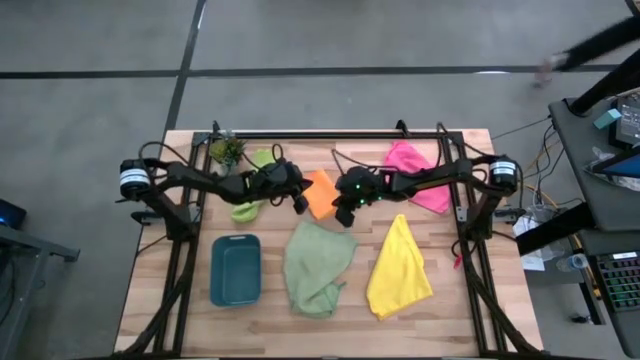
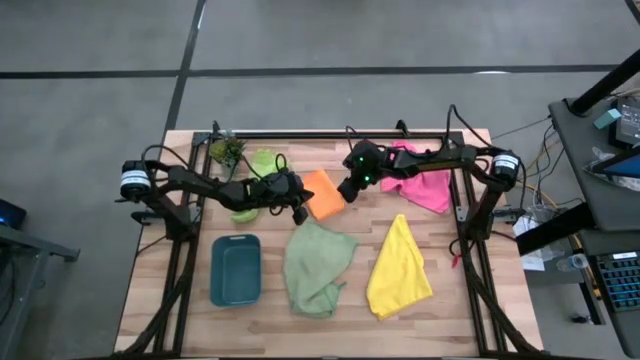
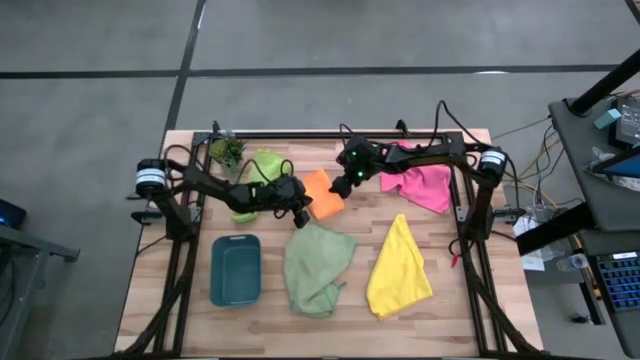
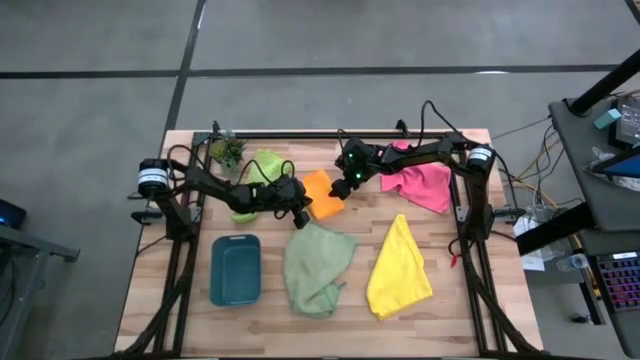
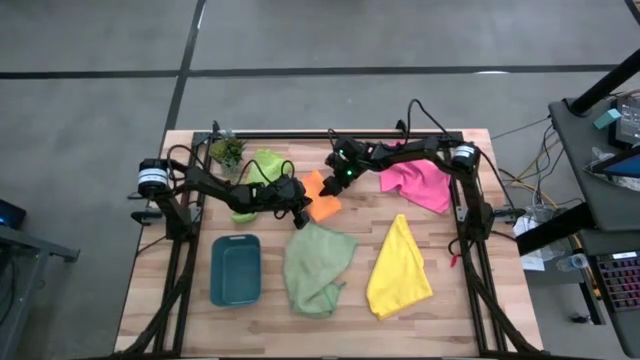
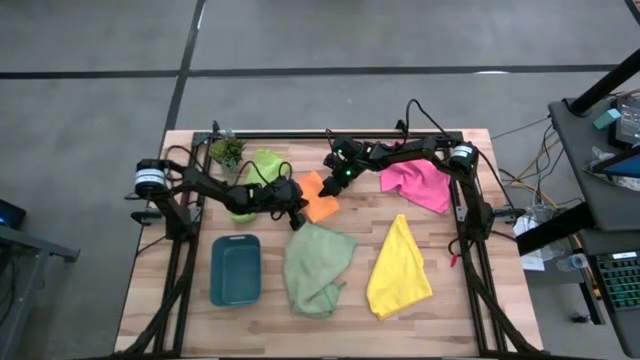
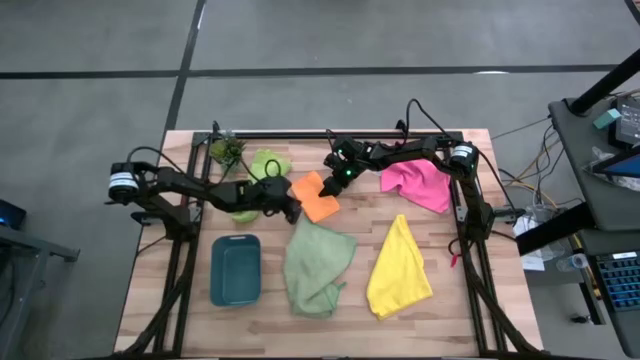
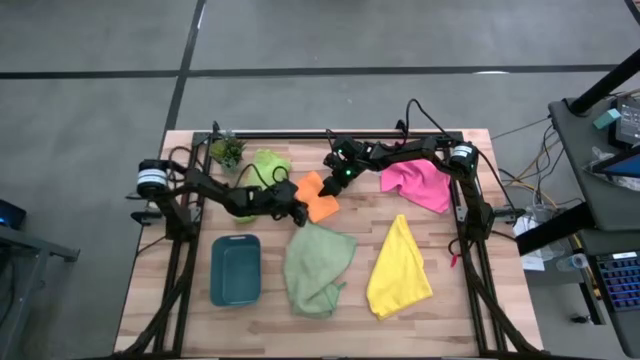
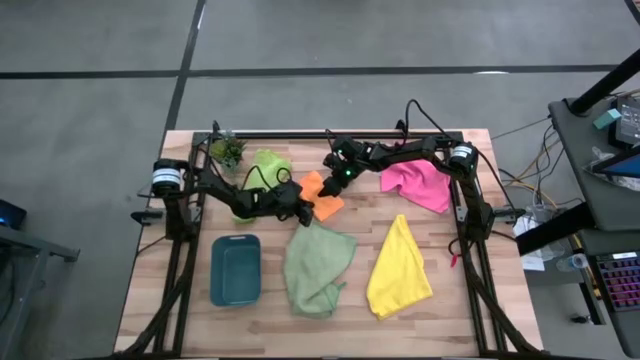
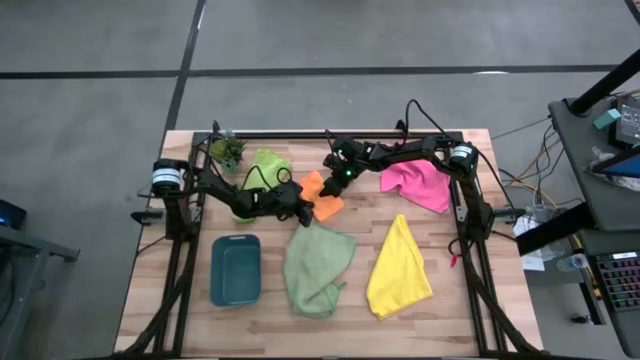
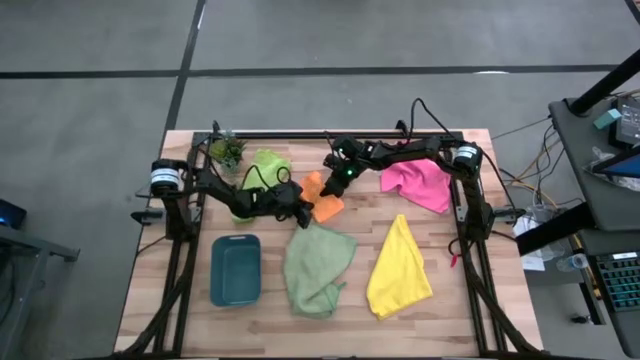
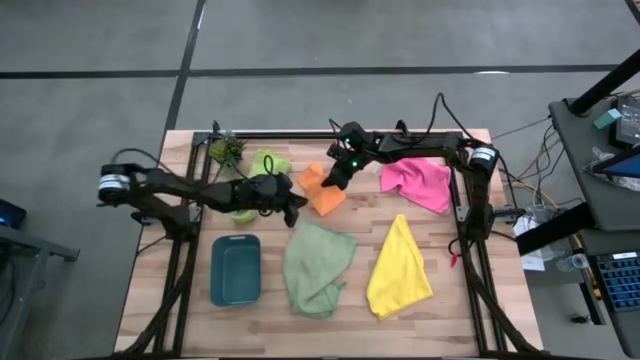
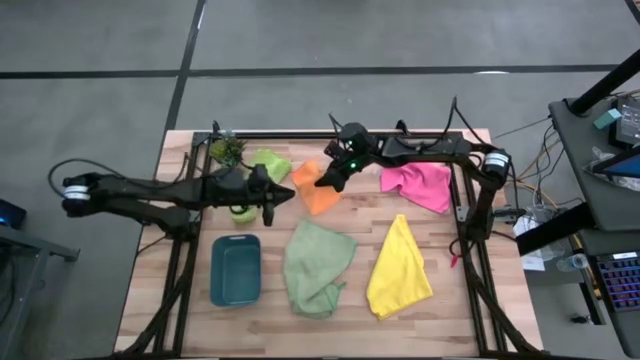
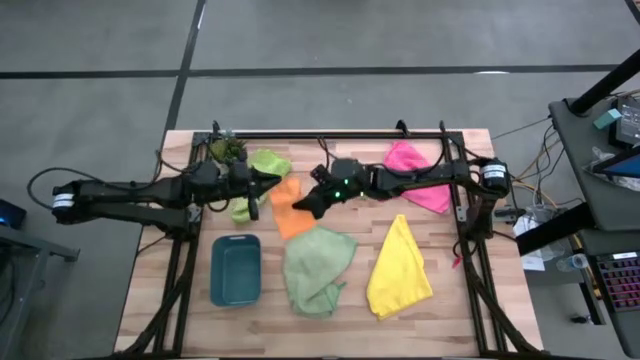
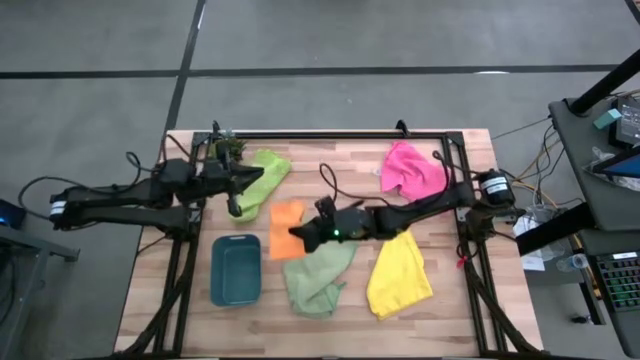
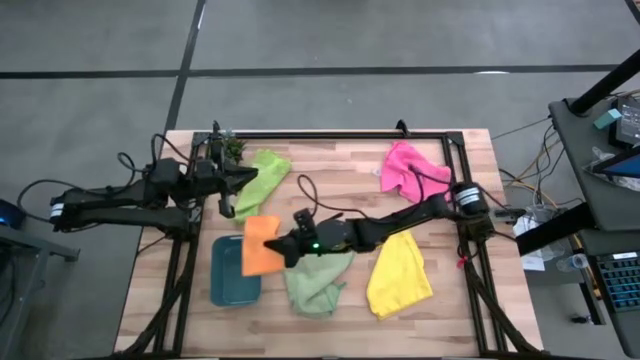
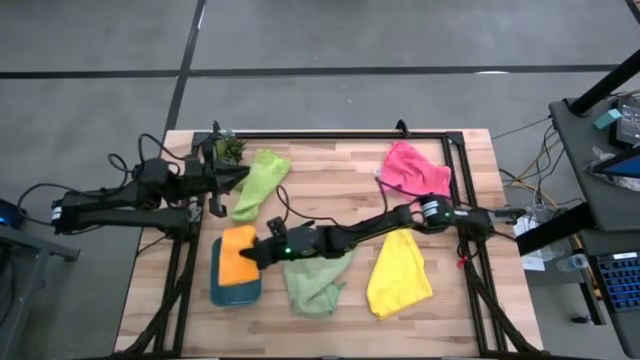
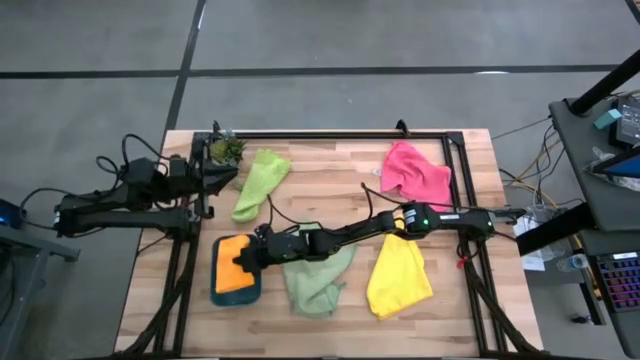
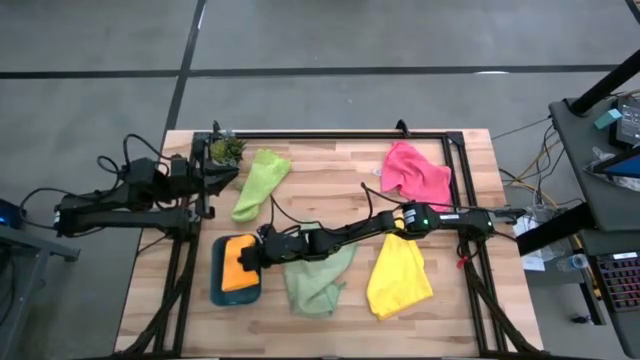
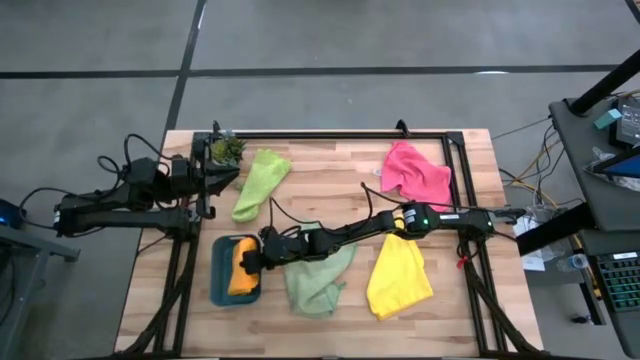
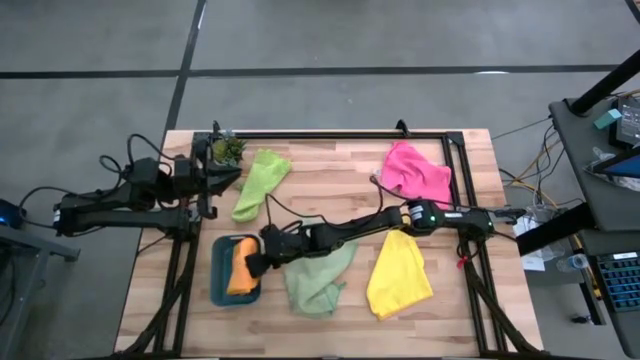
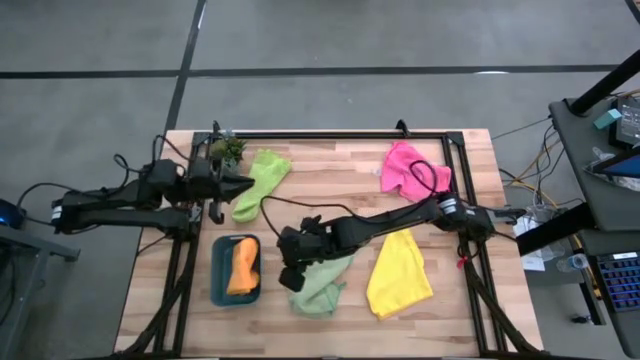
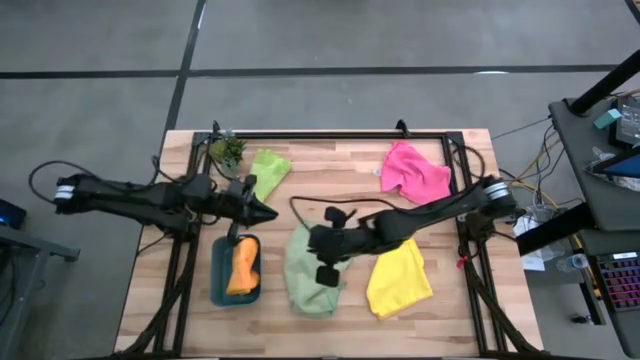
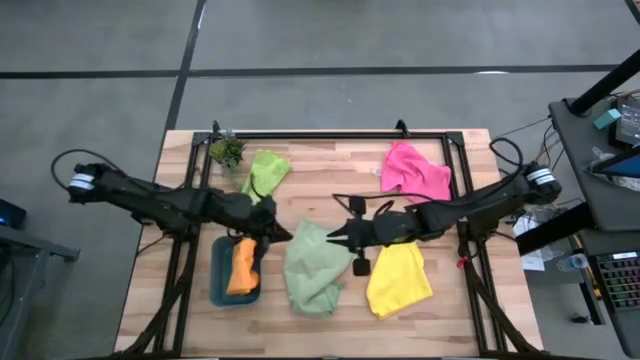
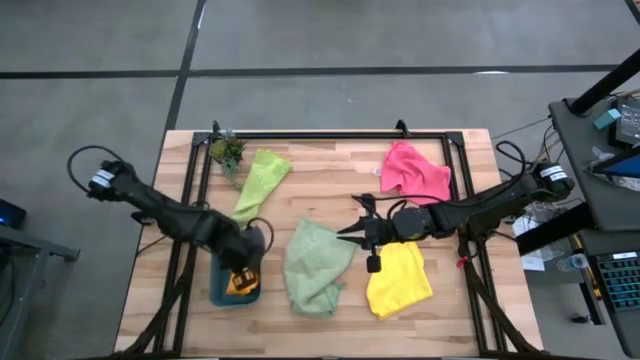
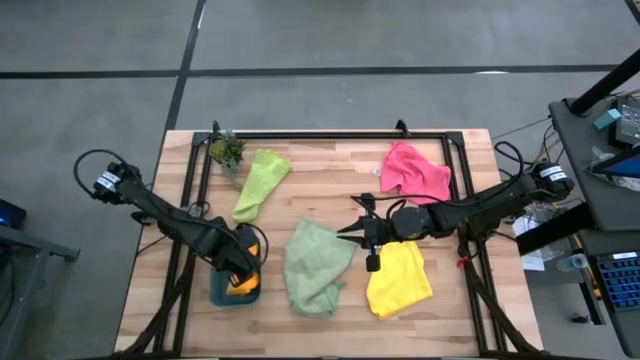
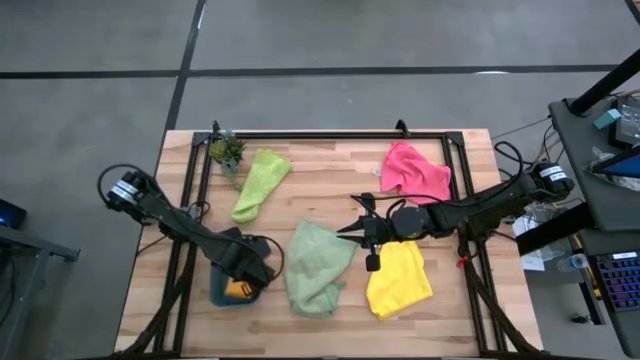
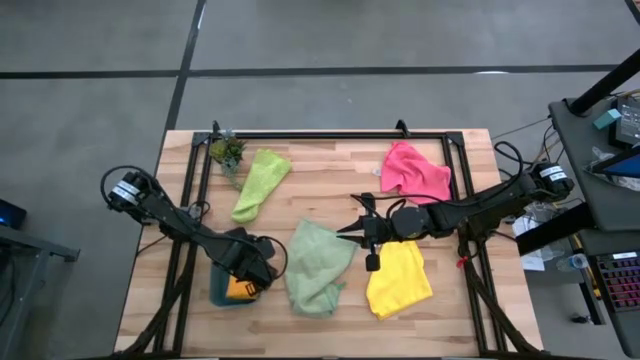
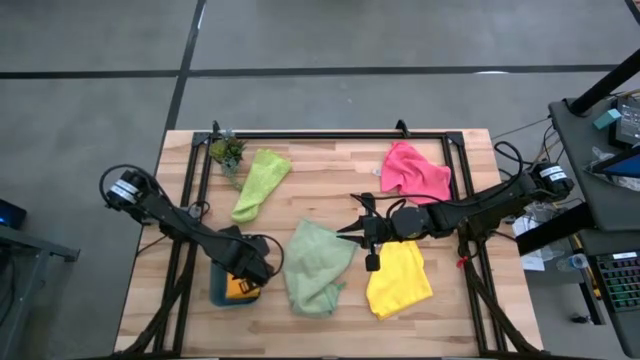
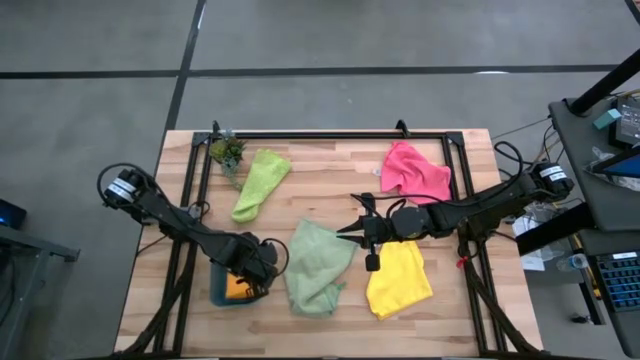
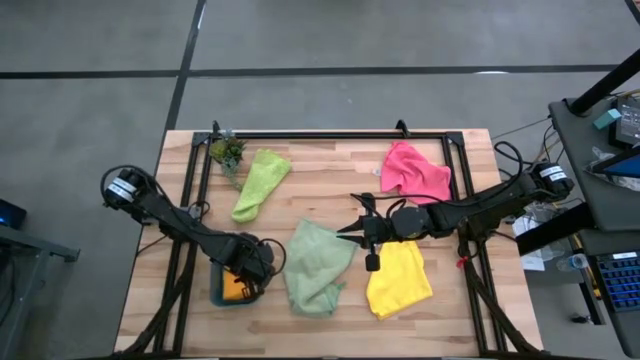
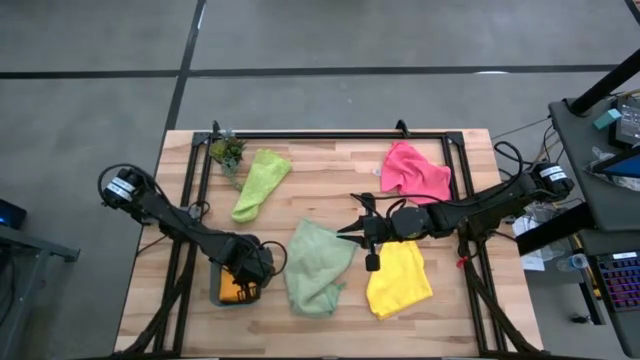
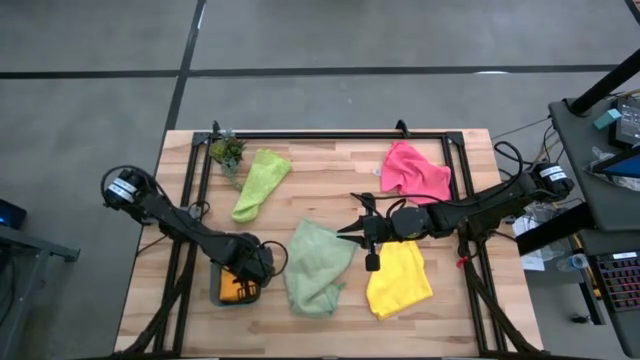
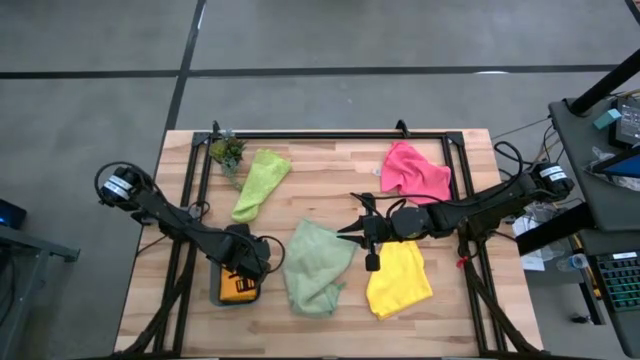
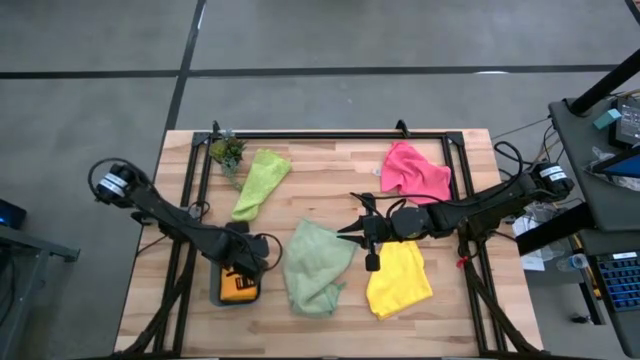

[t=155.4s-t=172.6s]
Task: Fold microfiber towels
Put the orange microfiber cloth into the blue bin

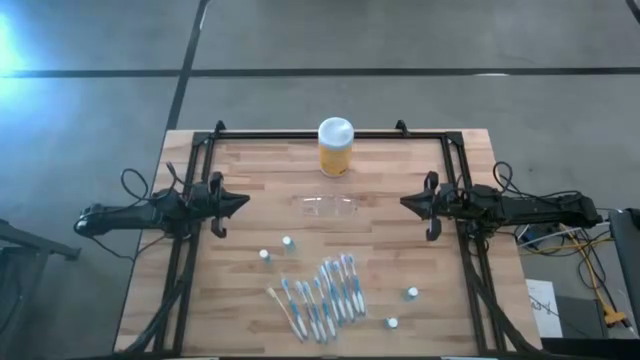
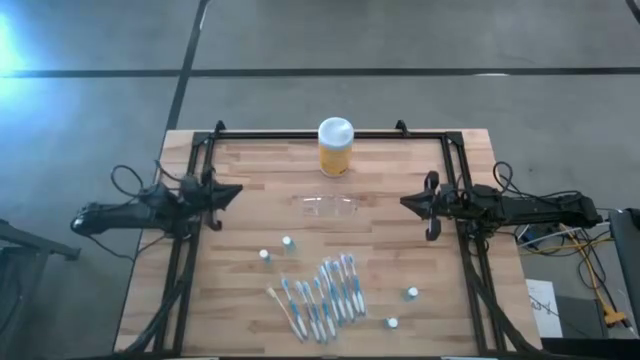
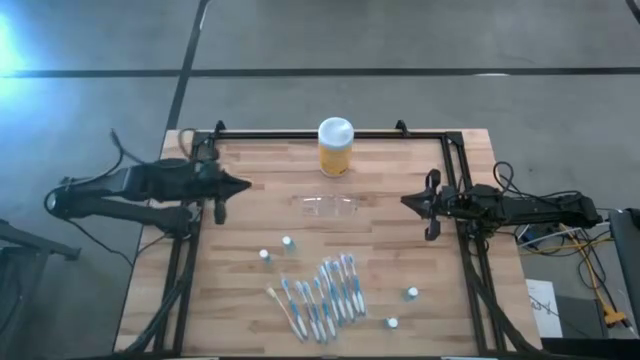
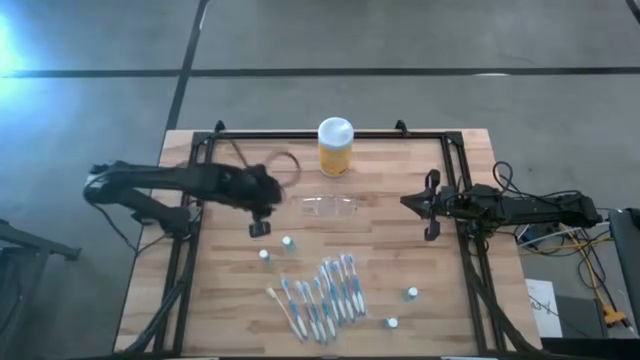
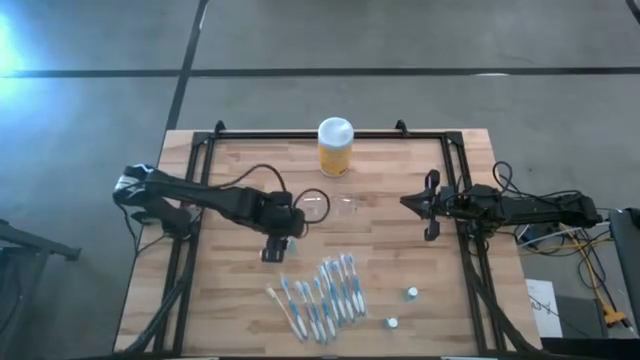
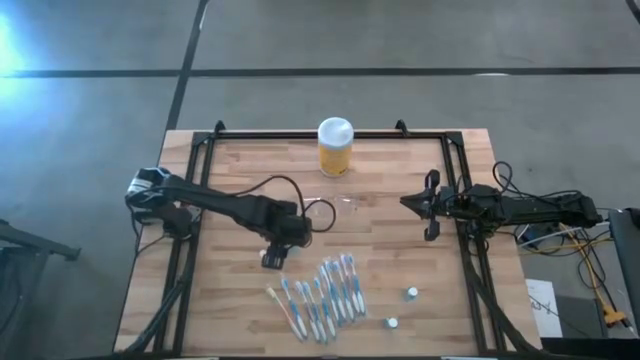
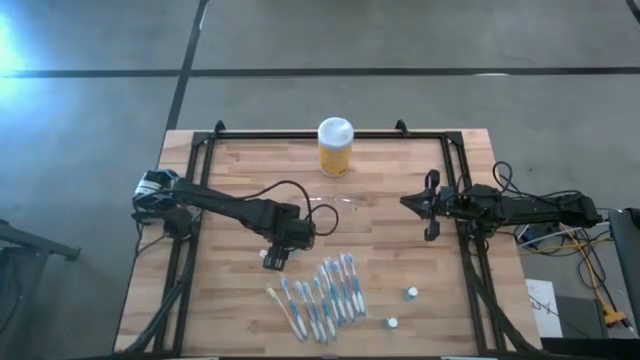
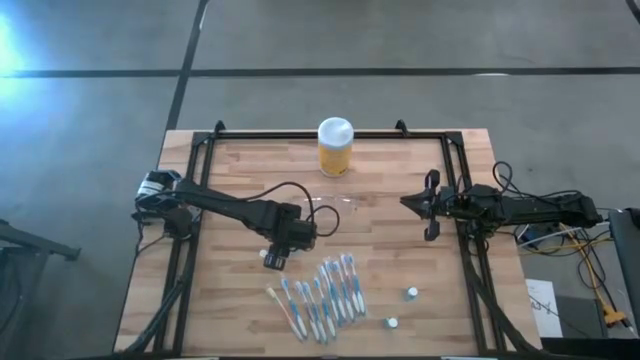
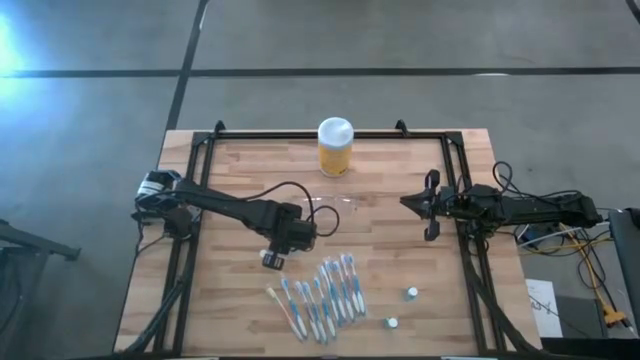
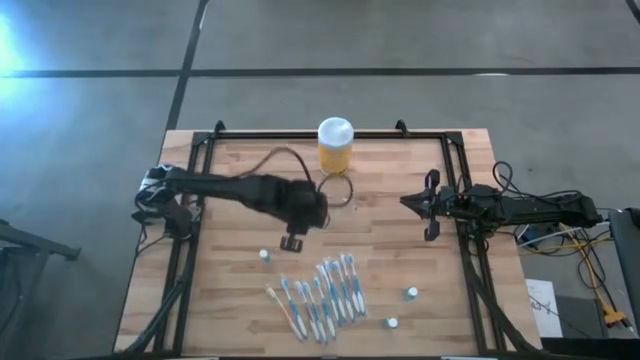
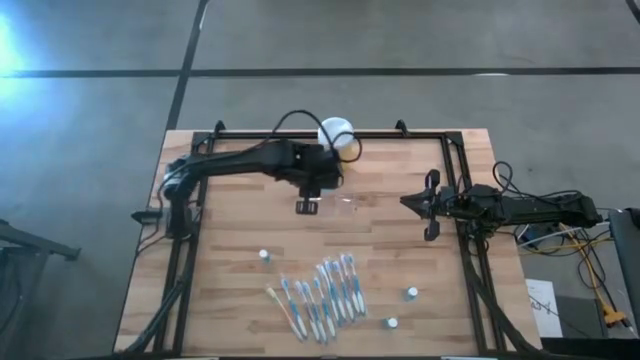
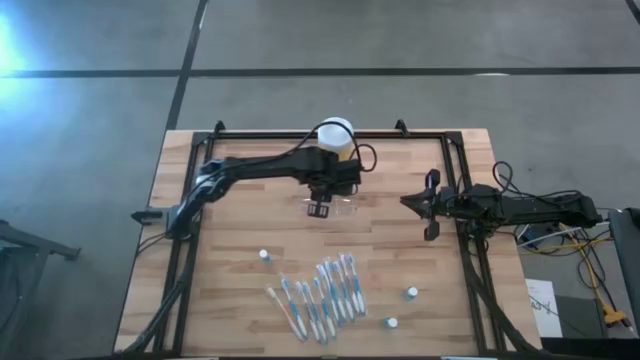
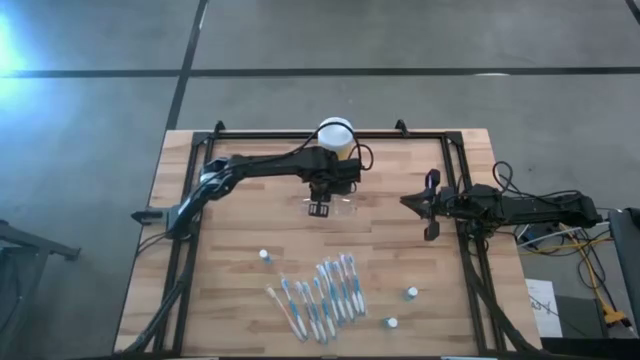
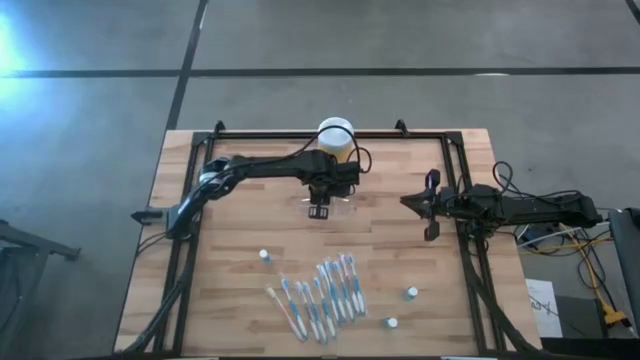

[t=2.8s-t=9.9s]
Task: Pick & Place toothbrushing station
Put the blue mouthwash bottle into the transparent organizer
